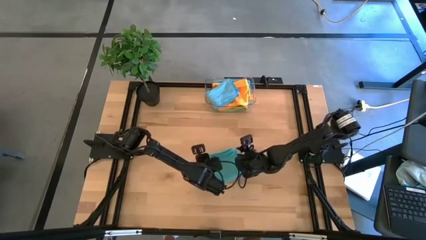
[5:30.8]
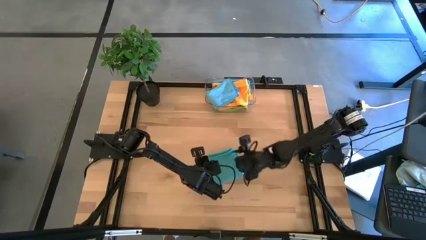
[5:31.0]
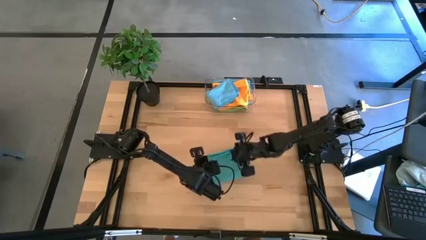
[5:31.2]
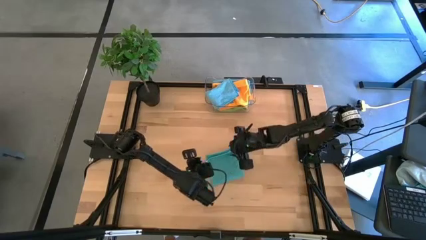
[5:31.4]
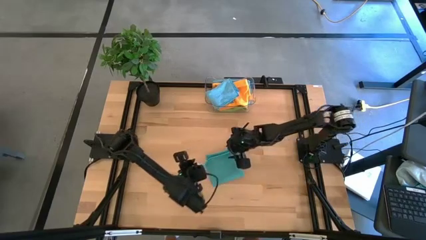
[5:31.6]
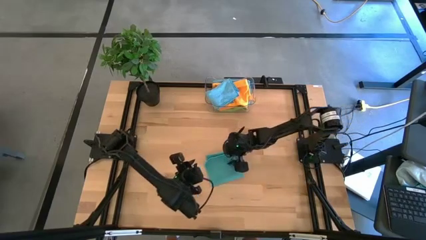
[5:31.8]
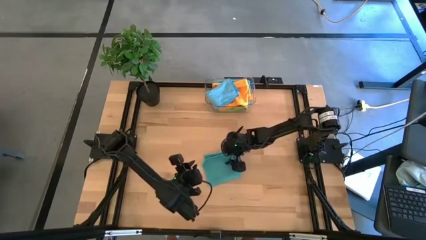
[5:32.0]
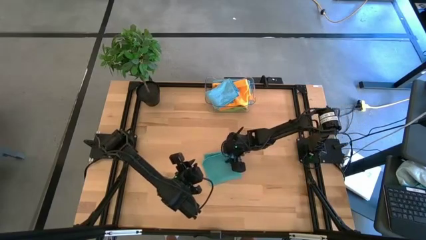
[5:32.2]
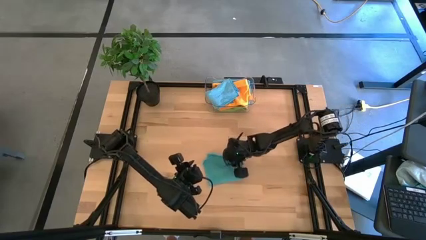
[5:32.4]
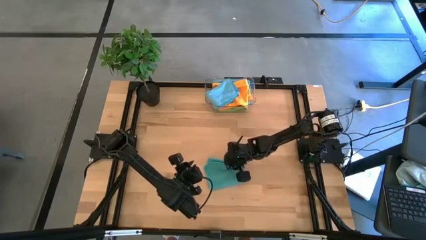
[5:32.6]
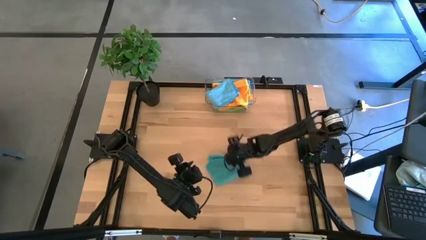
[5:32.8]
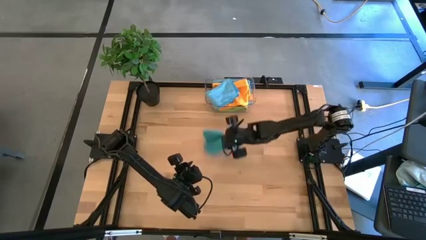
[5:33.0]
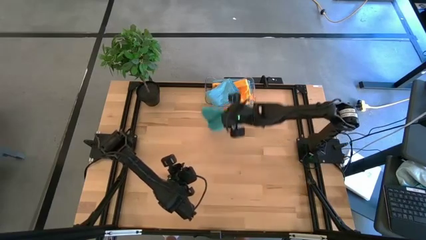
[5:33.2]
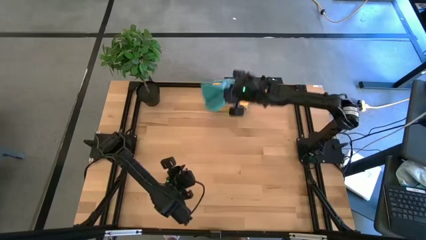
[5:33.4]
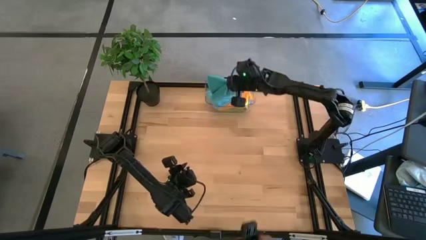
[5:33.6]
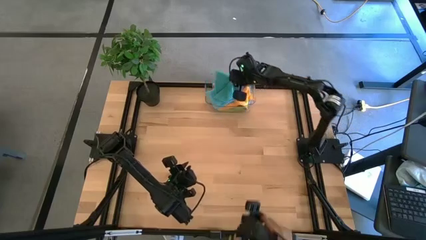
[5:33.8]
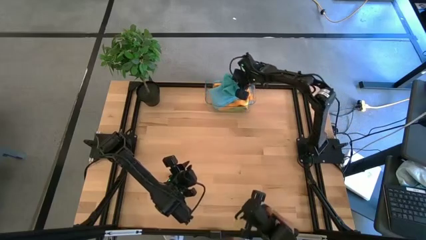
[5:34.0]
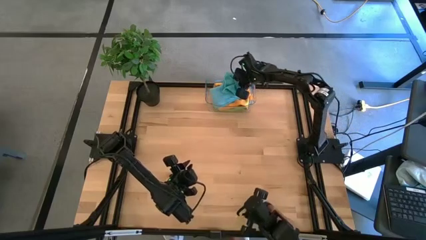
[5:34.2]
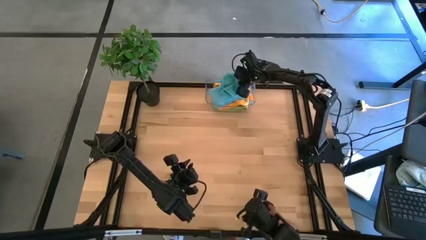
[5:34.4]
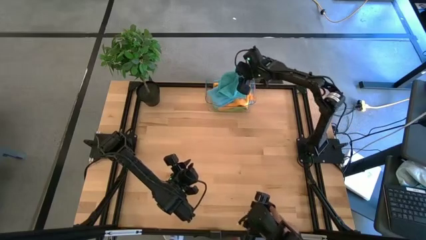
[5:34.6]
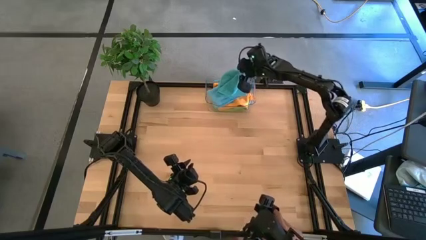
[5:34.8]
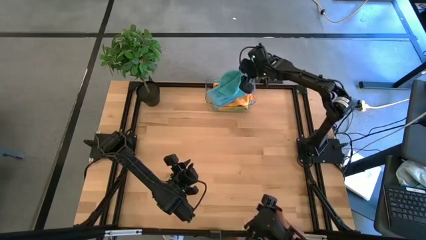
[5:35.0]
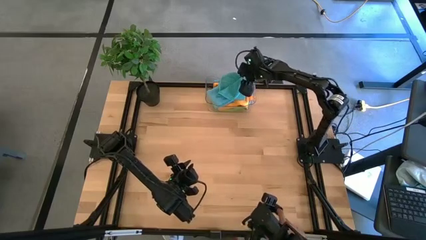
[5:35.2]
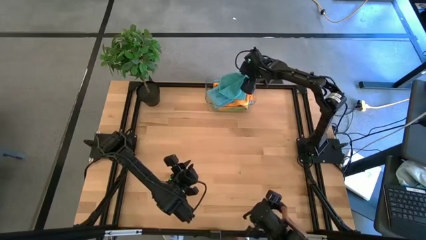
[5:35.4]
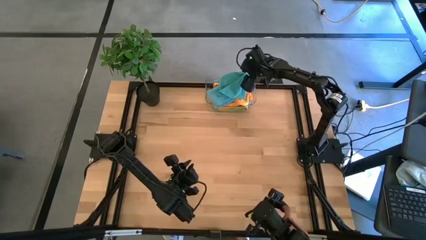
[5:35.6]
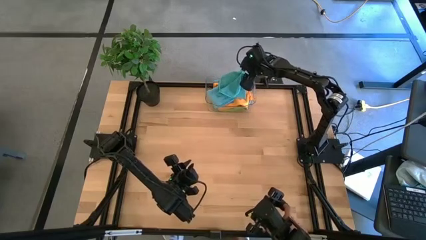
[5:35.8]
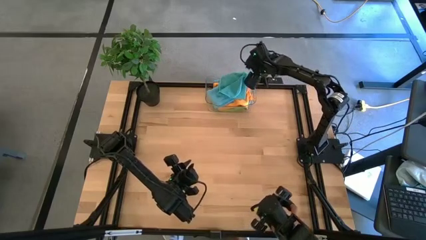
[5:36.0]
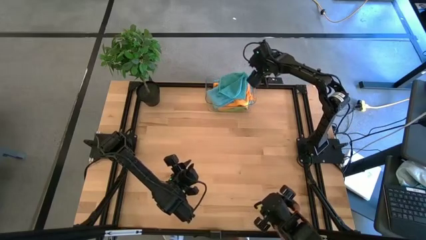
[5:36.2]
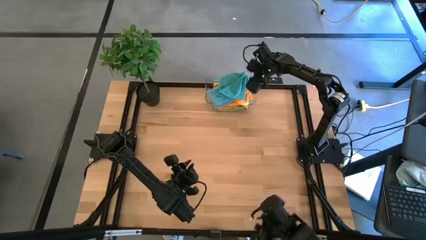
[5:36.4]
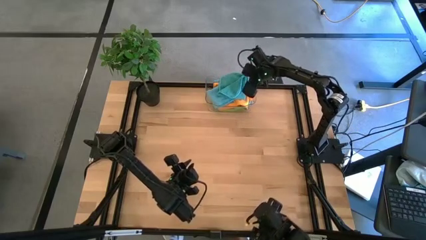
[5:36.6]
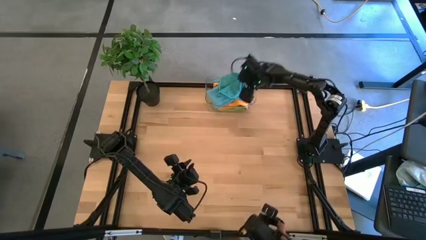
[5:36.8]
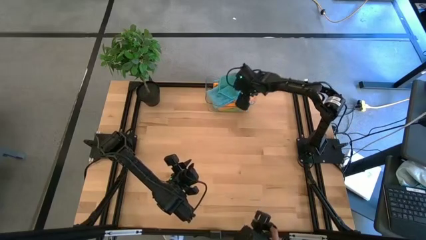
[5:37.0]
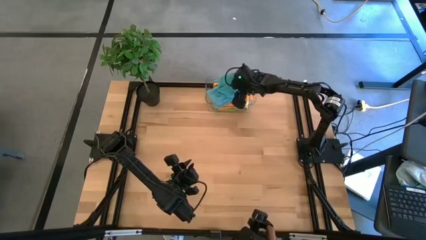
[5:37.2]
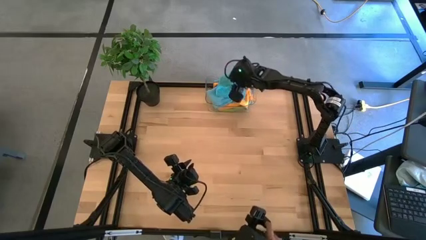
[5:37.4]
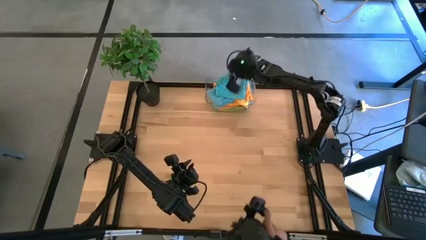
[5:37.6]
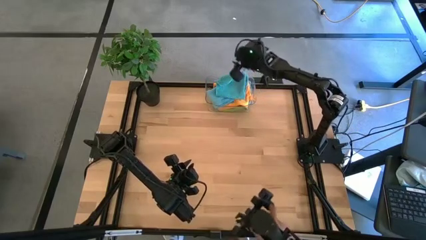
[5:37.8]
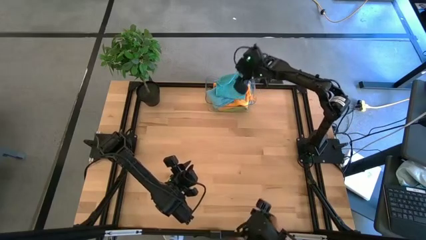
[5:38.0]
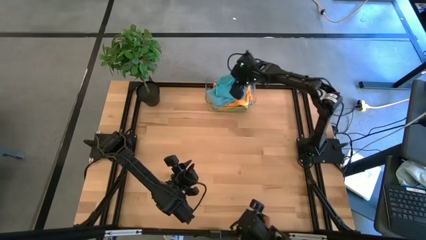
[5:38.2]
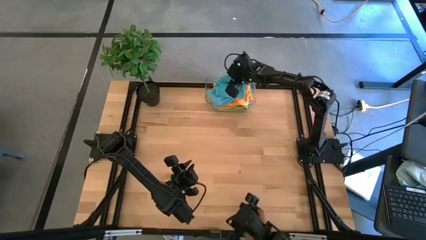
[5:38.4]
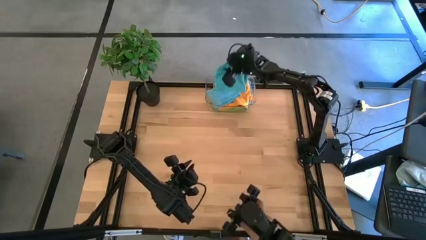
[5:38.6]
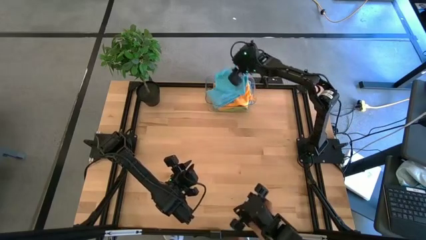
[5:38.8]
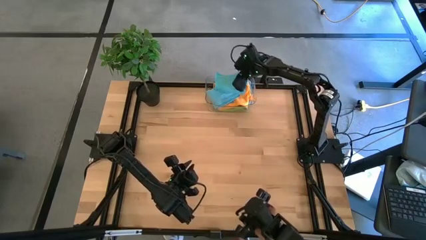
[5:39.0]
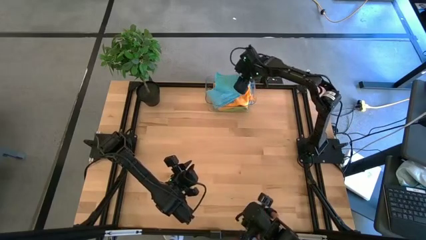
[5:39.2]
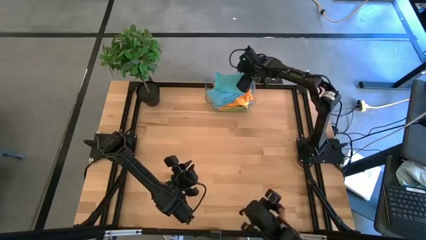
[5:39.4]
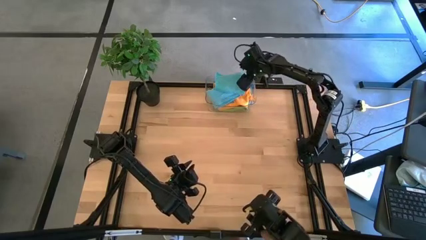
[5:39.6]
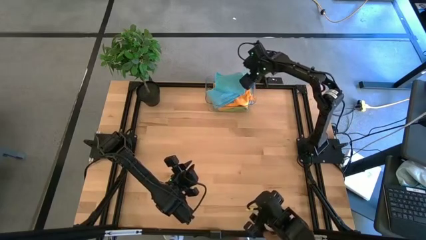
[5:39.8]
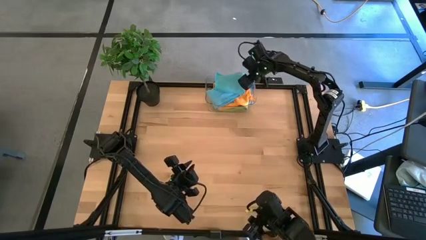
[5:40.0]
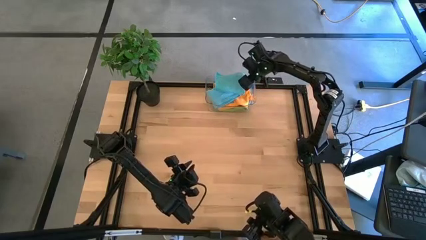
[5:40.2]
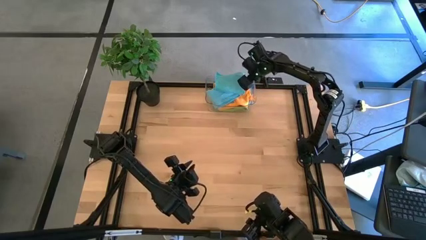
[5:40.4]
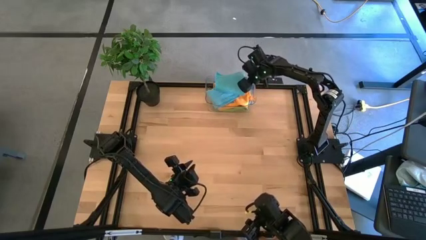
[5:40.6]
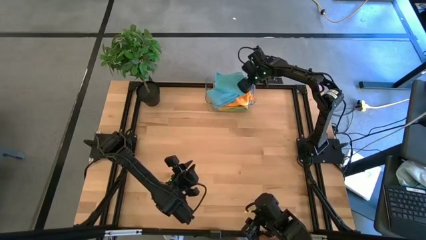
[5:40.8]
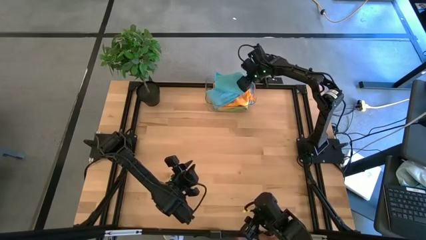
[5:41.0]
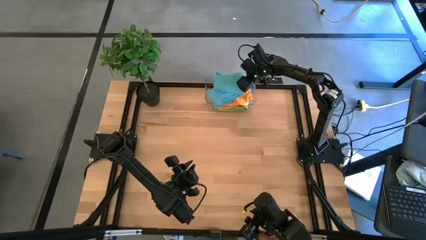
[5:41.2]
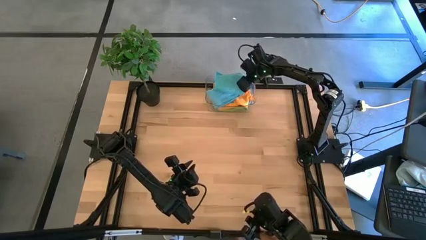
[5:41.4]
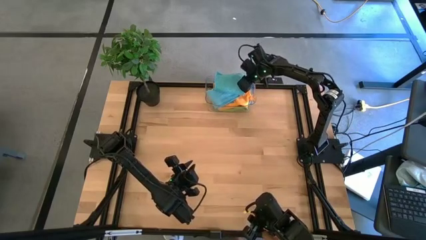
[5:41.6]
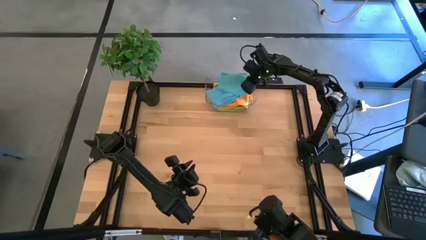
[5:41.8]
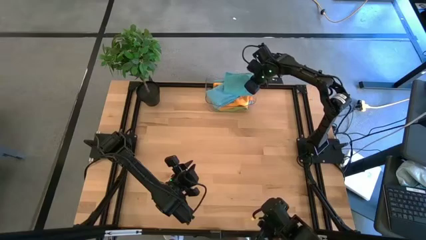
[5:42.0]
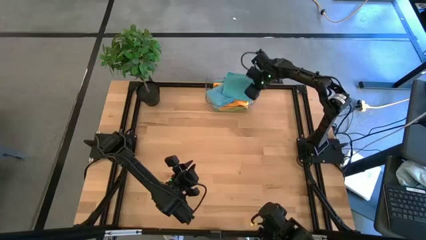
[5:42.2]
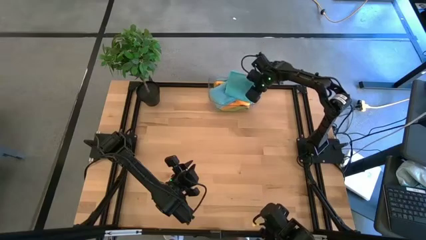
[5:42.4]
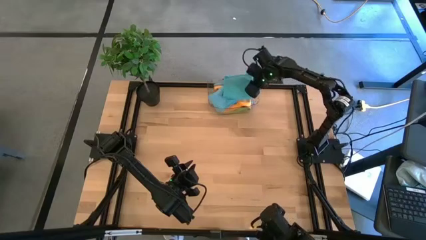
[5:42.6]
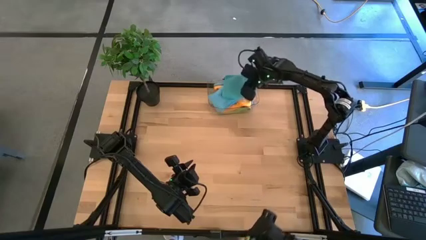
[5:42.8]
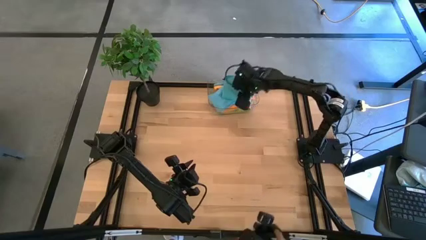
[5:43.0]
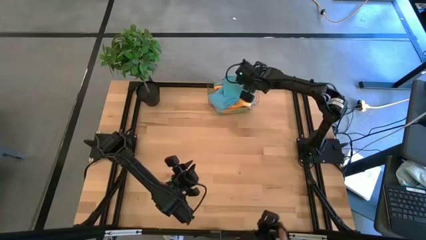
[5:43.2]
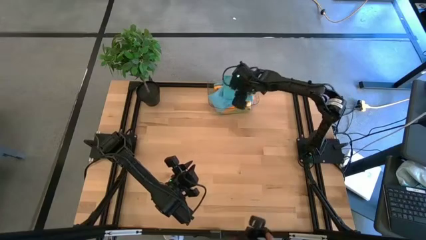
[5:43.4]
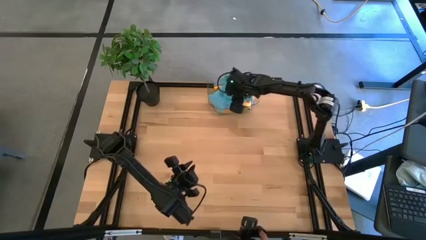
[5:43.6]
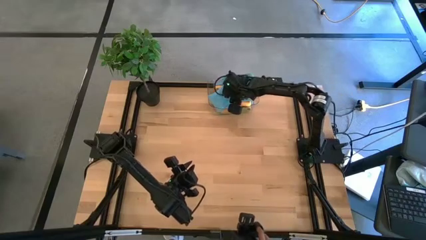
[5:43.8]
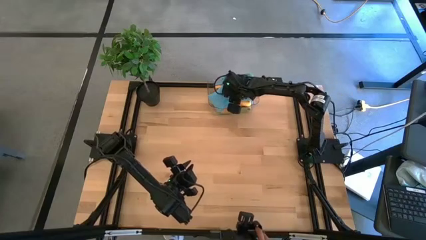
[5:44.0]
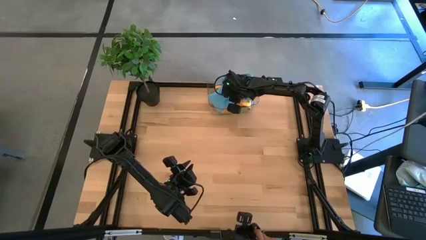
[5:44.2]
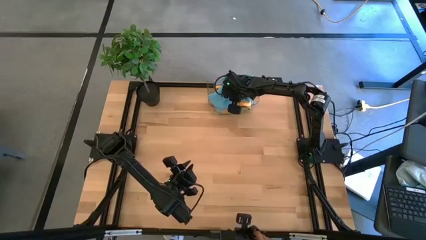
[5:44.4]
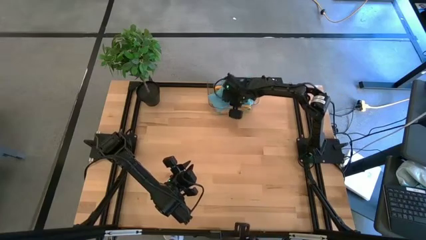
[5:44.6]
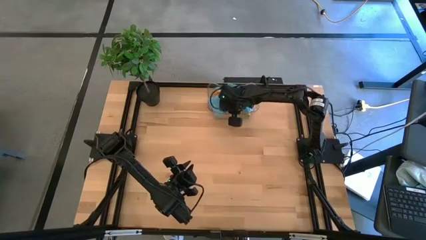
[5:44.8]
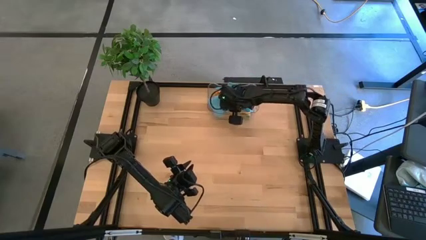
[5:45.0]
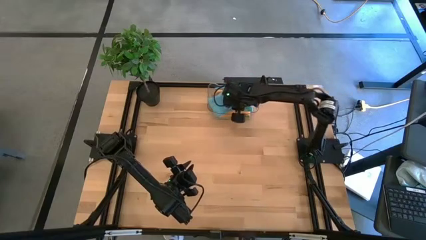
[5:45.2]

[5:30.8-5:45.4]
Task: Fold microfiber towels
Put the folded blue microfiber towel into the transparent bin
